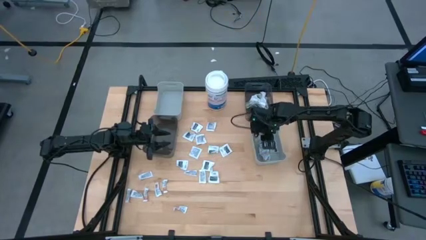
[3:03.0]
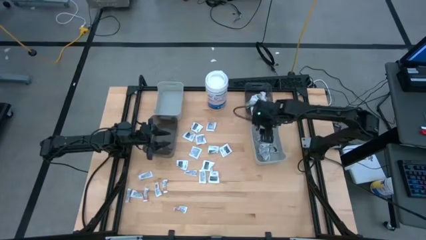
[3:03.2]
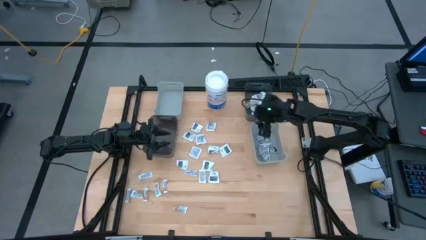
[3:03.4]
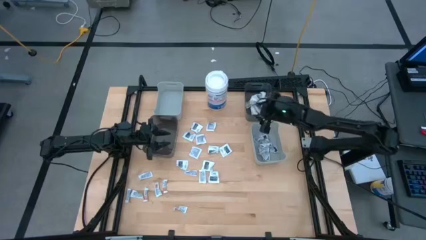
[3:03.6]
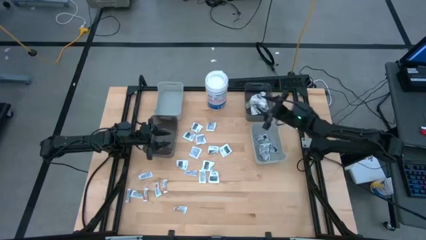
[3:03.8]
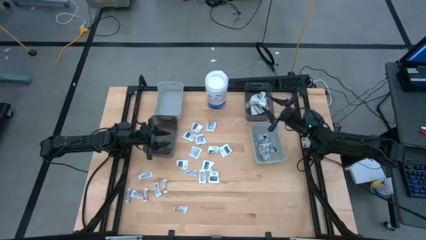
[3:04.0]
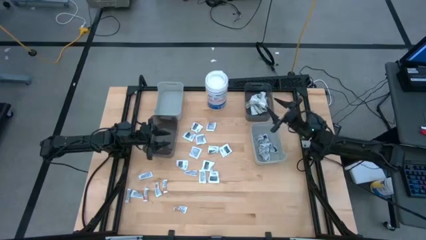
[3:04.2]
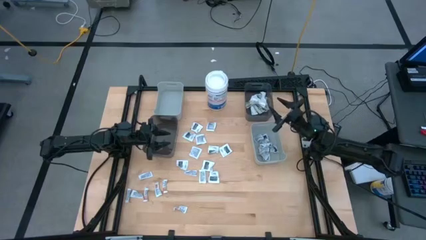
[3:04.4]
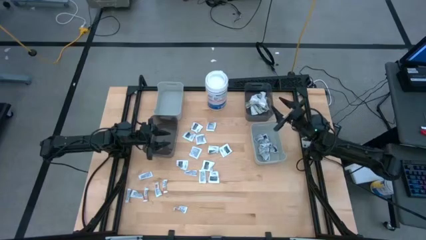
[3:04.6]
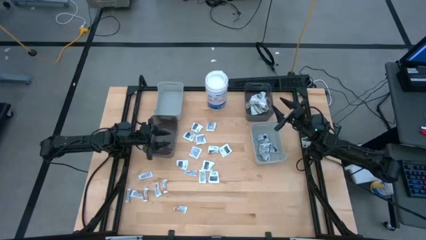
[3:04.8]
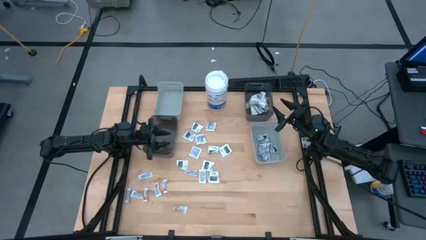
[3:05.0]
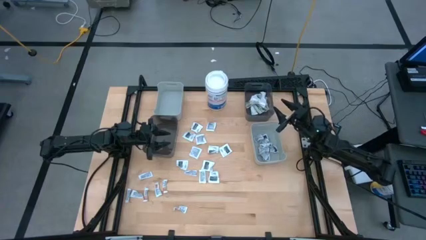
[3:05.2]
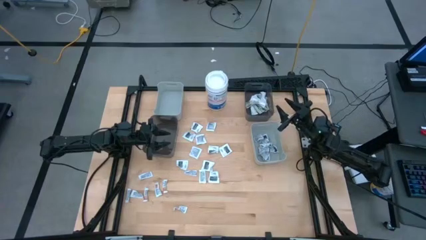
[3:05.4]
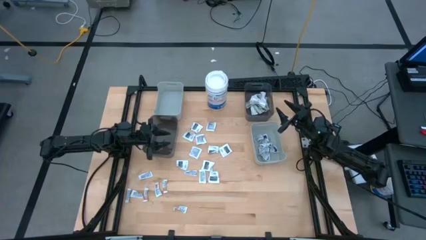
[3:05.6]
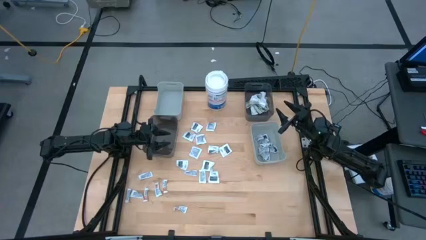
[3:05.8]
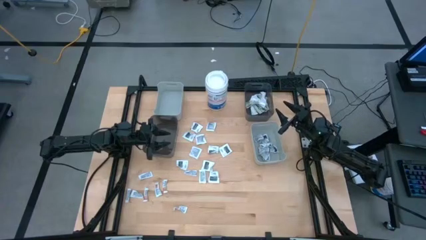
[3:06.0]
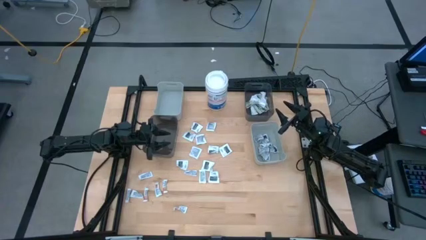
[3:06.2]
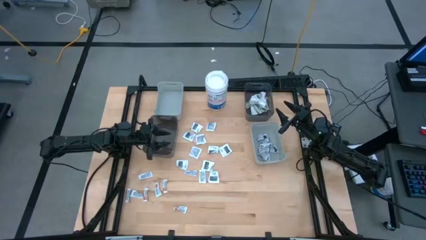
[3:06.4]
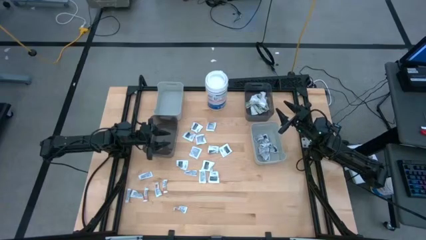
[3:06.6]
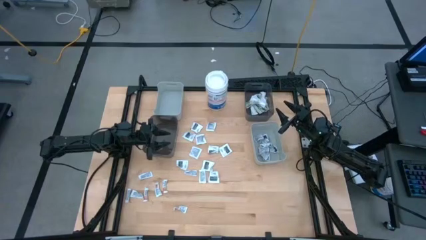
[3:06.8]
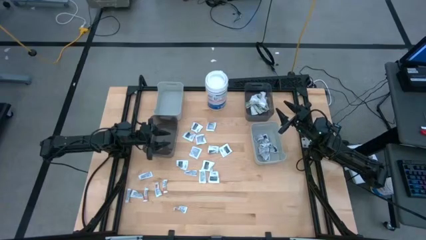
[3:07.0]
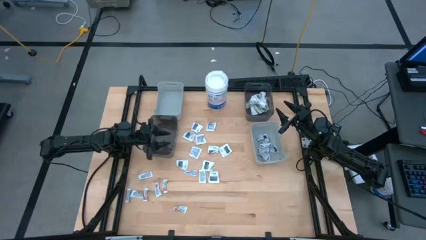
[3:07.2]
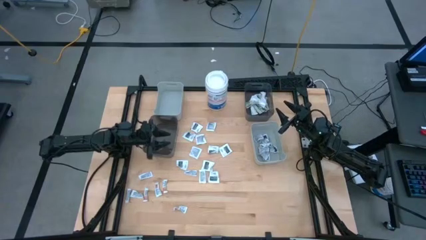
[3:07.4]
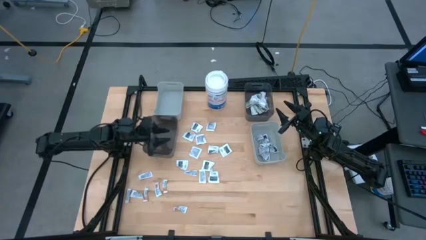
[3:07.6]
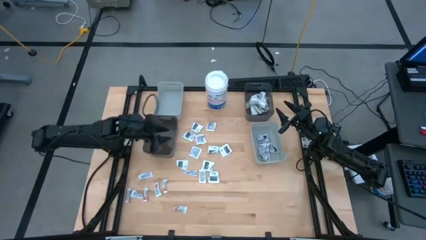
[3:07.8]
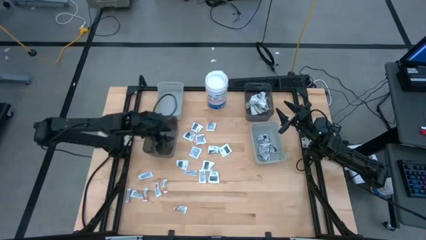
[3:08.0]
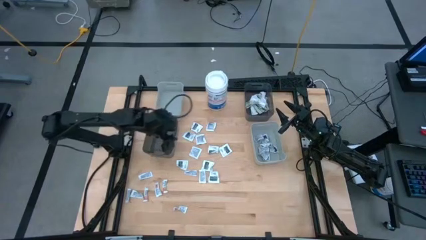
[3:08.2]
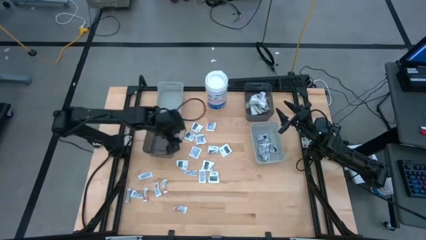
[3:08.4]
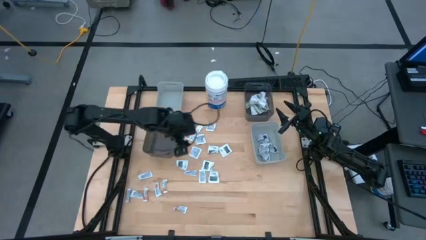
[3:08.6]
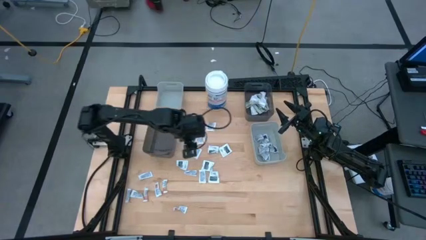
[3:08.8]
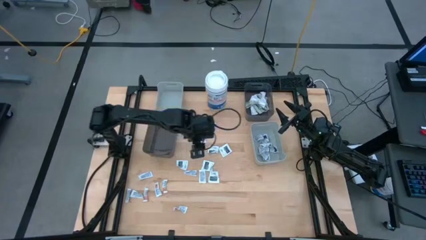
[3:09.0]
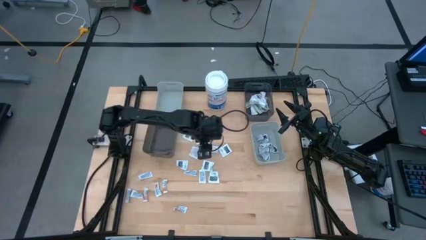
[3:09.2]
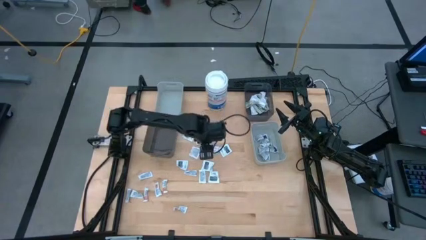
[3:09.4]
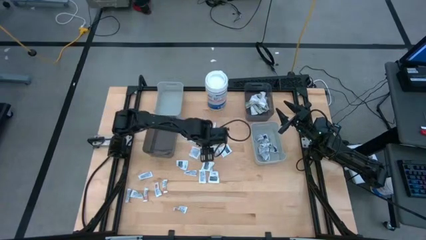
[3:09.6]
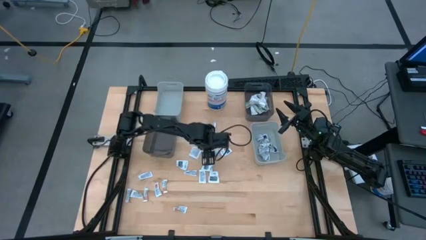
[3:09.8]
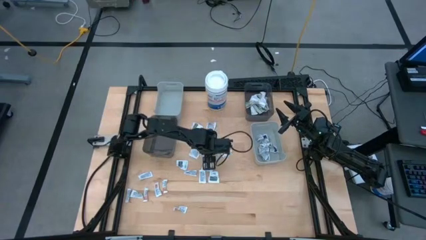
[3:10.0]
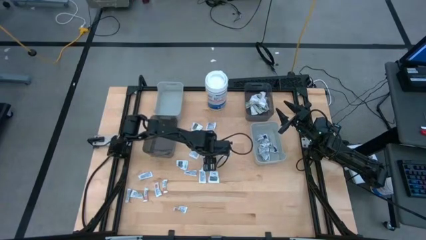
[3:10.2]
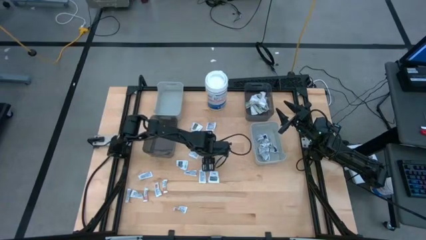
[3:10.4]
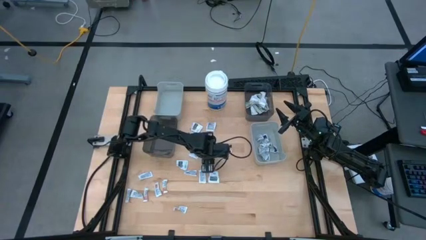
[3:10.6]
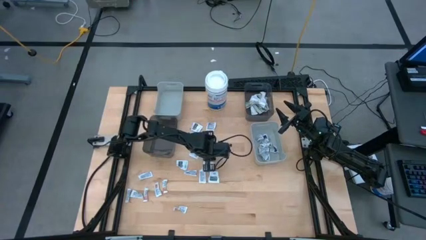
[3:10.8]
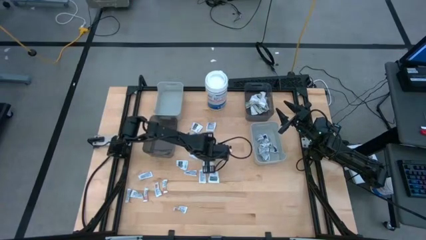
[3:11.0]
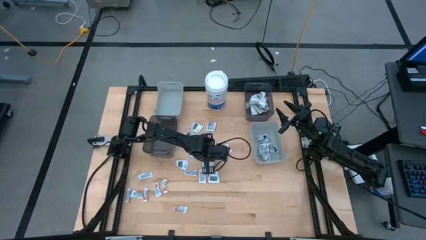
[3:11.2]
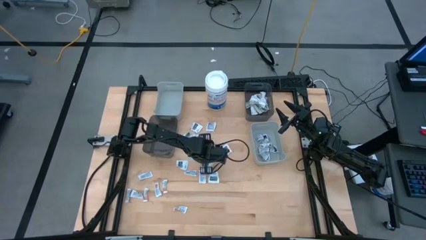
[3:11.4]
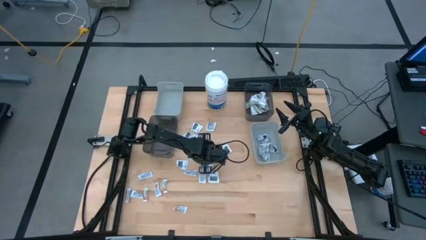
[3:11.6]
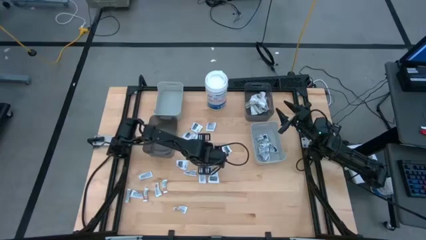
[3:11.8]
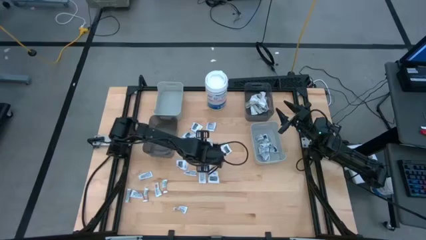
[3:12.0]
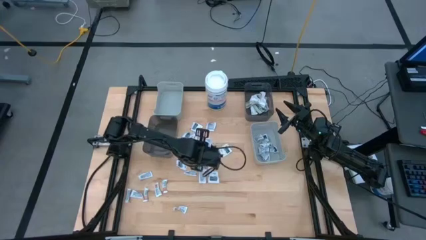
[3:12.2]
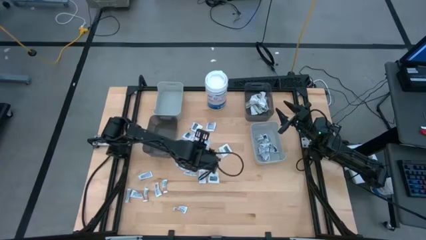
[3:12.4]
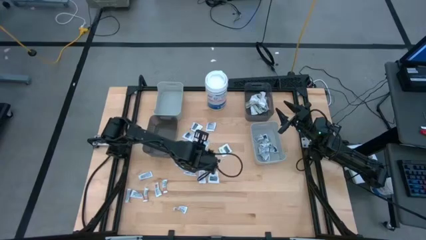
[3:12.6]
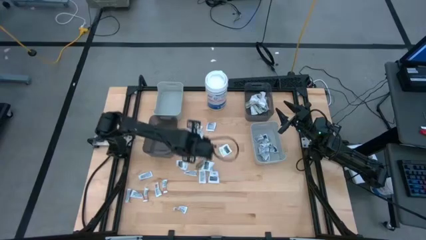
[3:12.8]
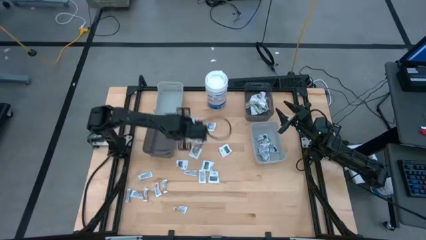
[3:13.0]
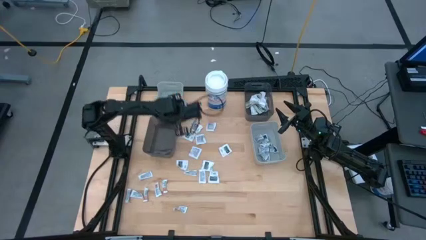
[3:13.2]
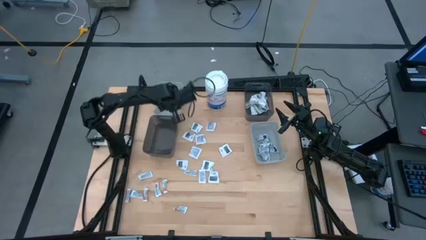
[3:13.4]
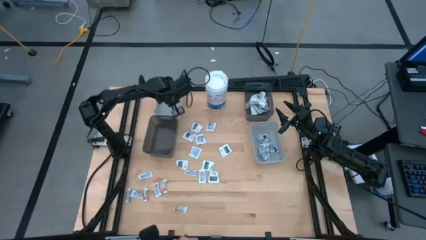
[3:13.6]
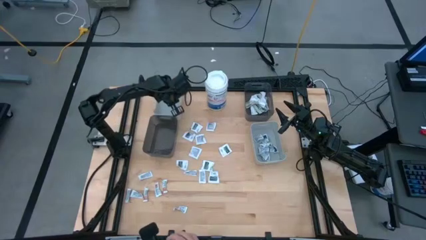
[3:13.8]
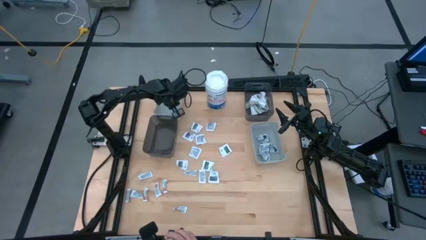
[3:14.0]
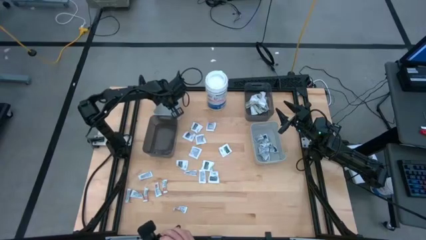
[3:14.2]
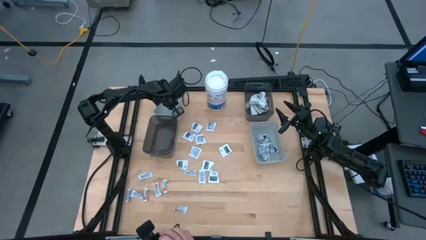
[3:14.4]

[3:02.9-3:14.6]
Task: Pick & Place First Aid Supplies
Put the gray towelette pack into the left gray bin

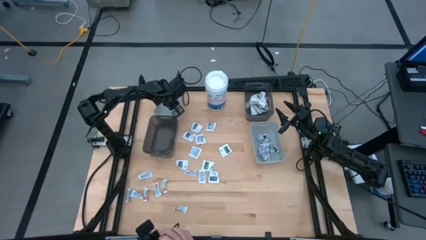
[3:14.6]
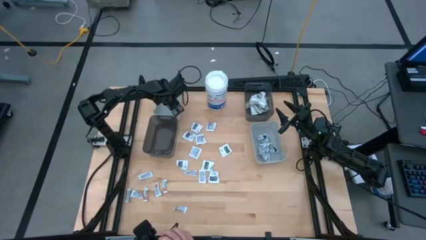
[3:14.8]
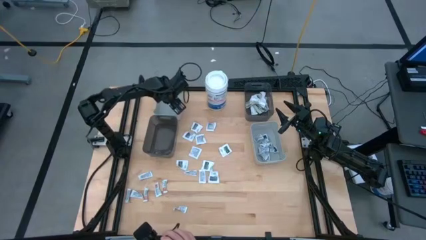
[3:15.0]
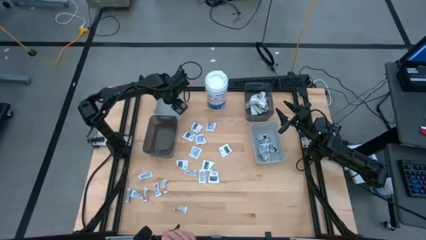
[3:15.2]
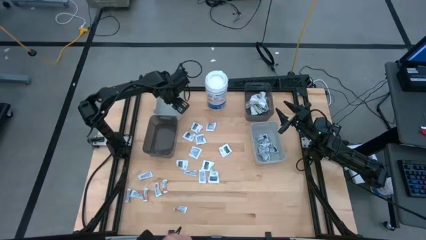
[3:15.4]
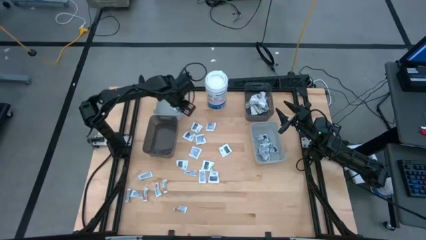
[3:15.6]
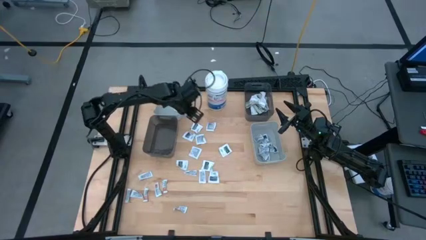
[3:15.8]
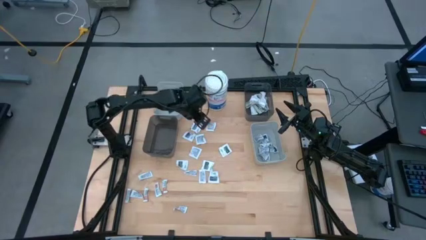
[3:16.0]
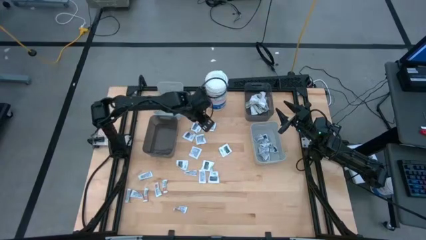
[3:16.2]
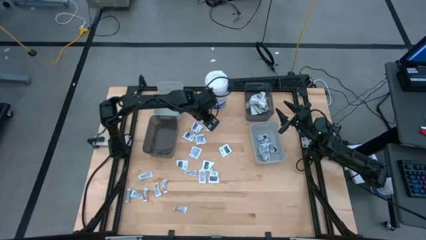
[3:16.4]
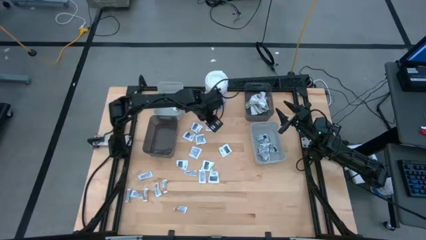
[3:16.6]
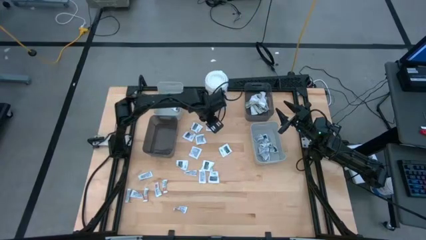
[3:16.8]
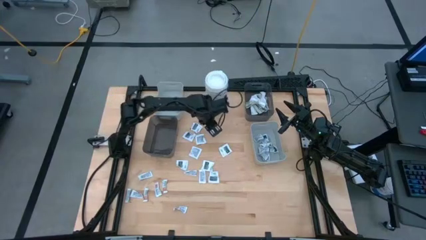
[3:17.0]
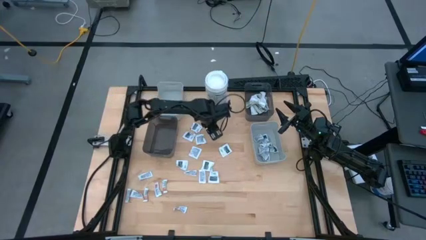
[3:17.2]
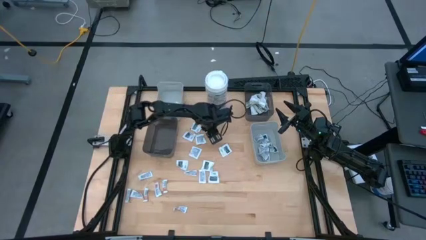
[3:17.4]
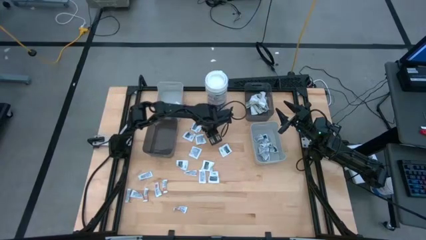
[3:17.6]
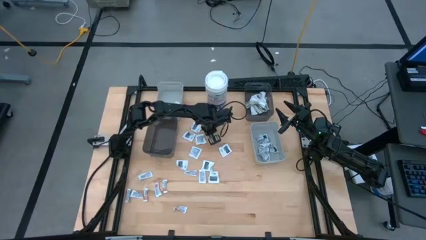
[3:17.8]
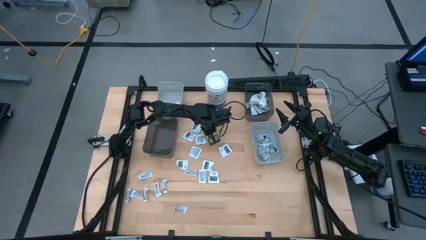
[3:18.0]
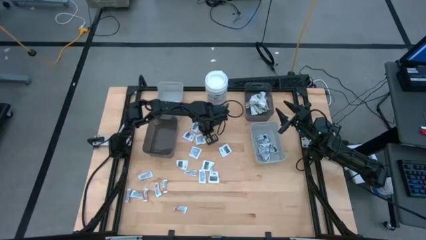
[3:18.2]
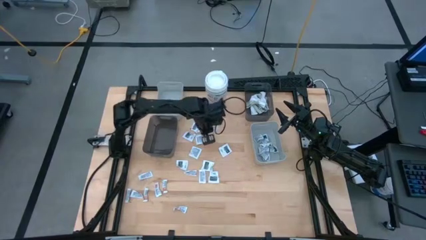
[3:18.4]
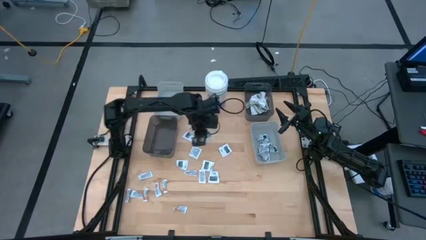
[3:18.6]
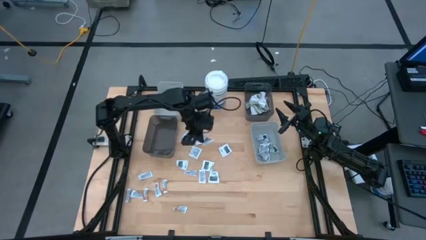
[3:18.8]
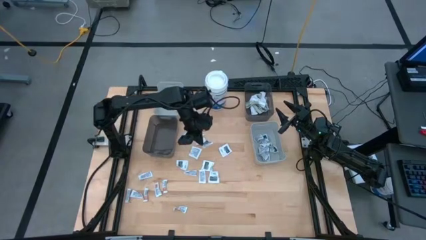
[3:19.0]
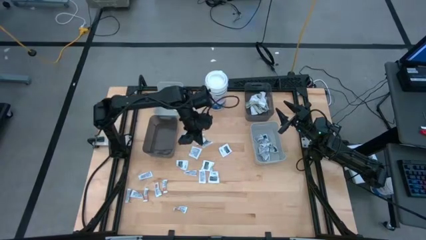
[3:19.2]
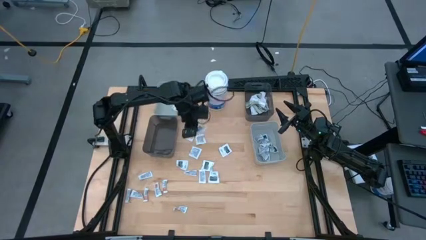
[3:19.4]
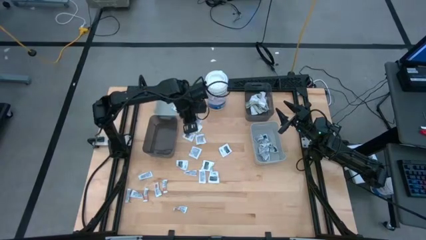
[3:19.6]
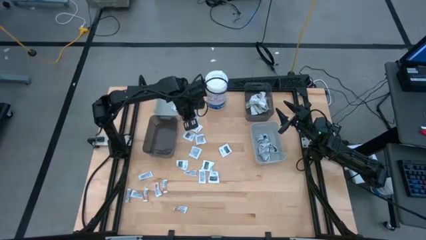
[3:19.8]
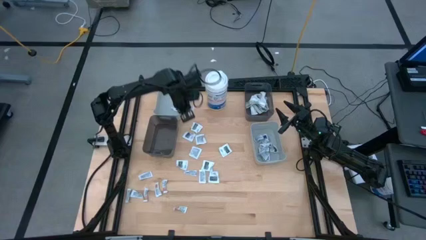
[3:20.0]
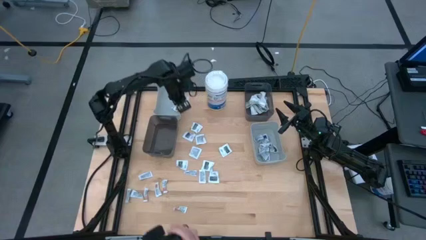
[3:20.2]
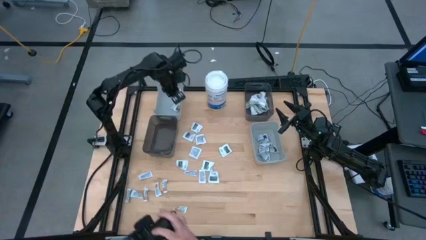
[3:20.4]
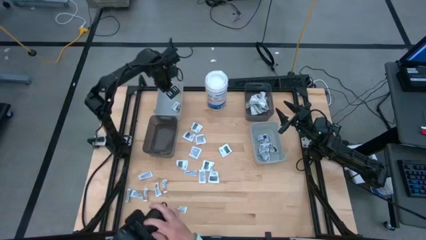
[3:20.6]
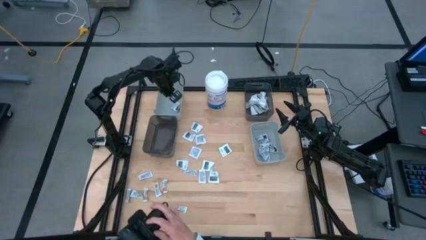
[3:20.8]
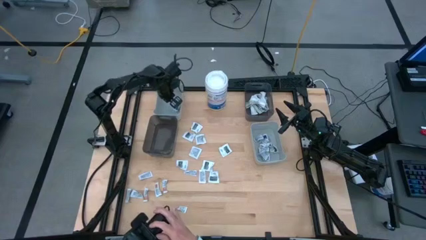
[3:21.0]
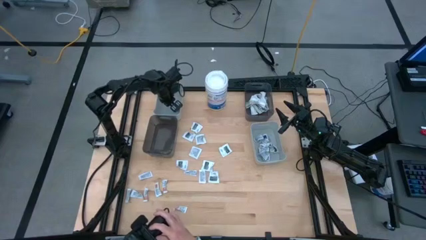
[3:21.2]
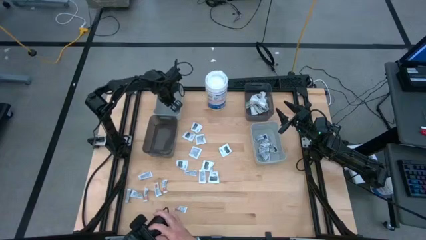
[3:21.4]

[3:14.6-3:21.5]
Put the gray towelette pack into the left gray bin
